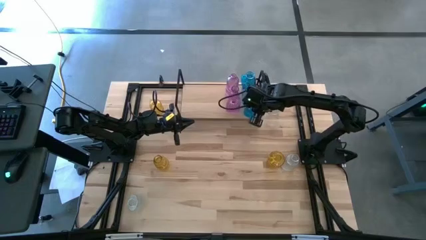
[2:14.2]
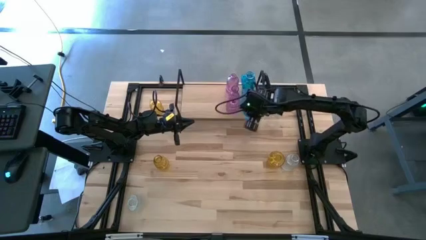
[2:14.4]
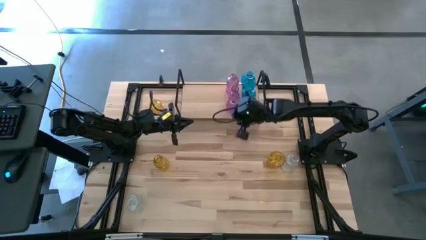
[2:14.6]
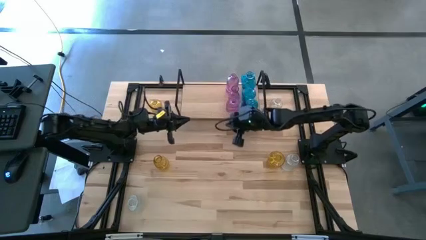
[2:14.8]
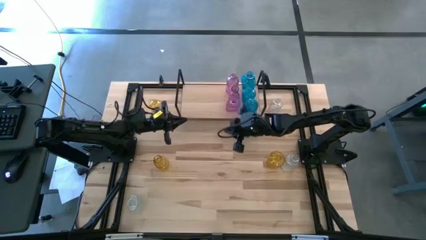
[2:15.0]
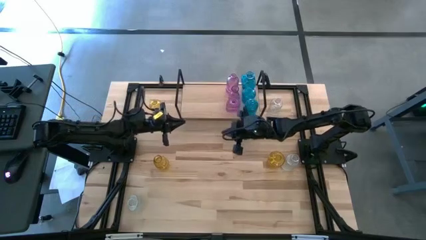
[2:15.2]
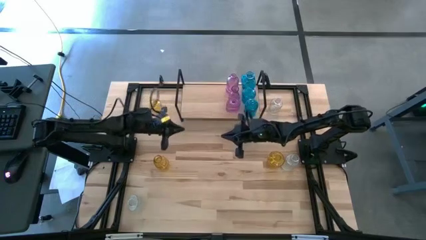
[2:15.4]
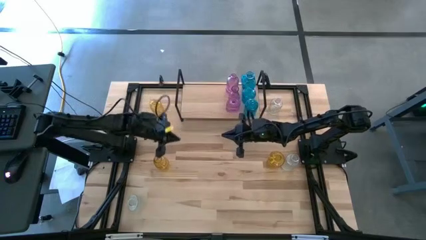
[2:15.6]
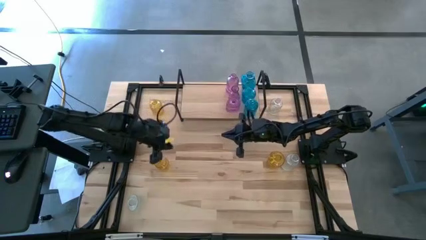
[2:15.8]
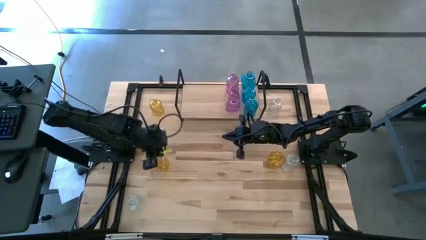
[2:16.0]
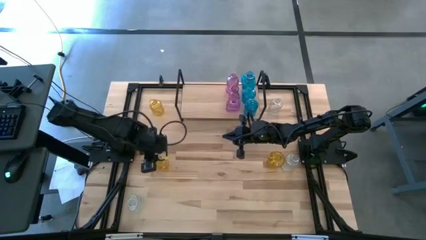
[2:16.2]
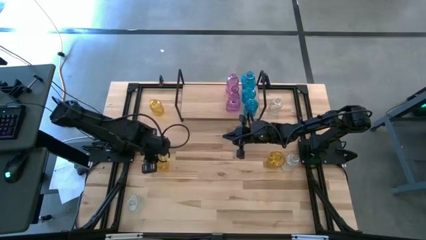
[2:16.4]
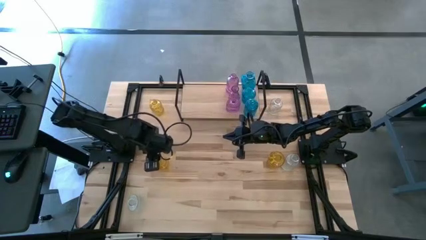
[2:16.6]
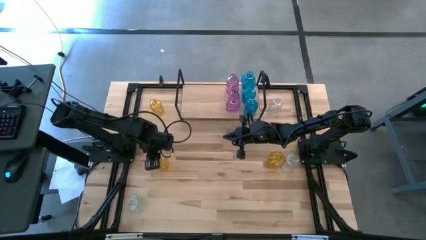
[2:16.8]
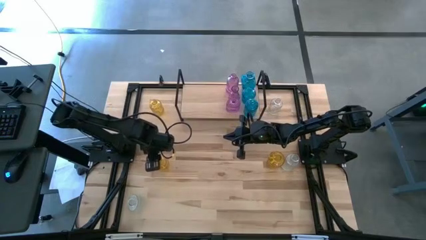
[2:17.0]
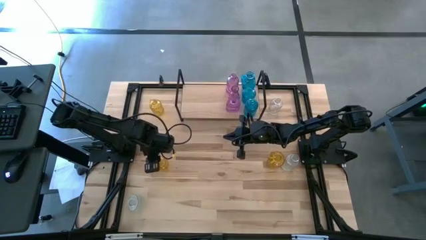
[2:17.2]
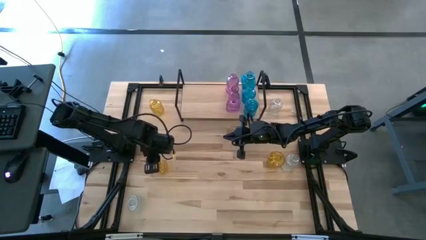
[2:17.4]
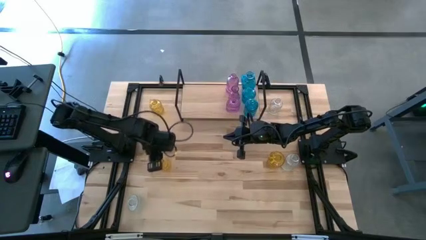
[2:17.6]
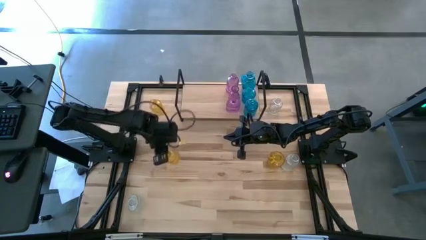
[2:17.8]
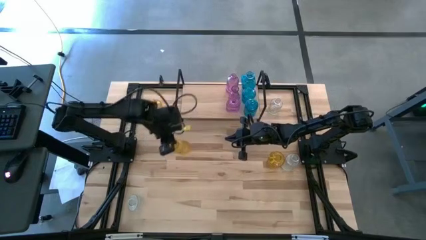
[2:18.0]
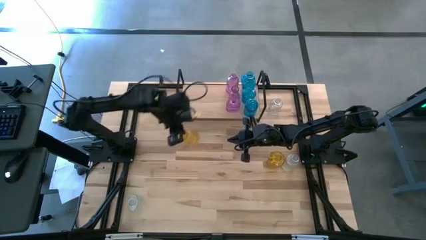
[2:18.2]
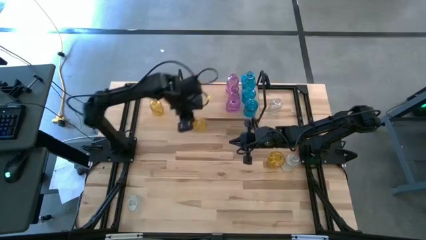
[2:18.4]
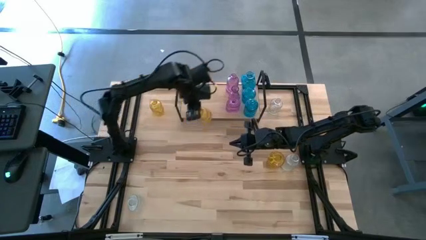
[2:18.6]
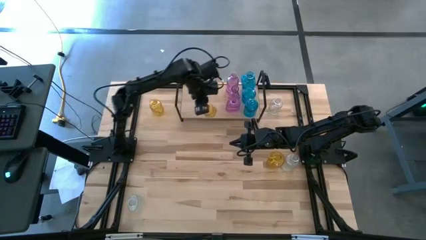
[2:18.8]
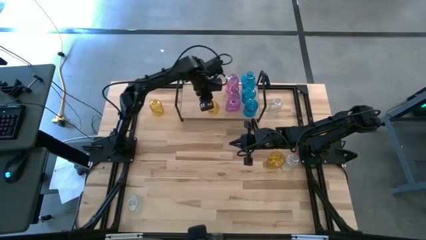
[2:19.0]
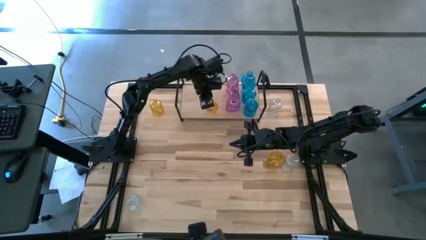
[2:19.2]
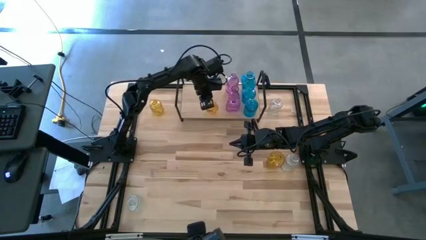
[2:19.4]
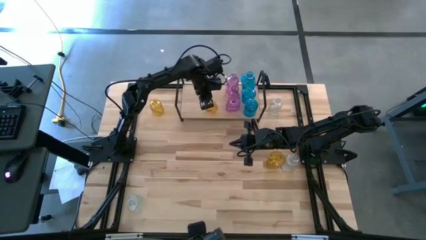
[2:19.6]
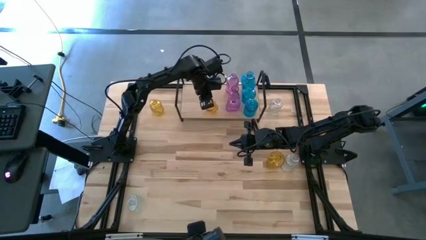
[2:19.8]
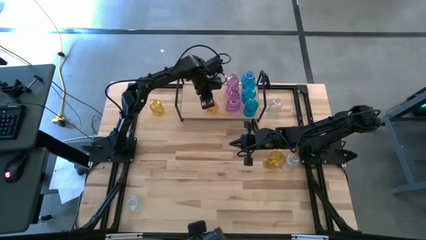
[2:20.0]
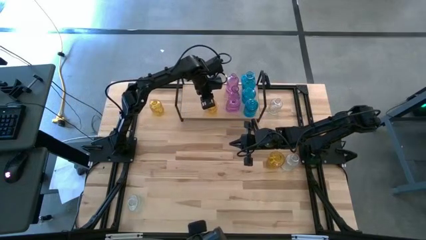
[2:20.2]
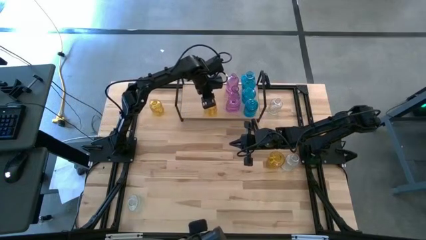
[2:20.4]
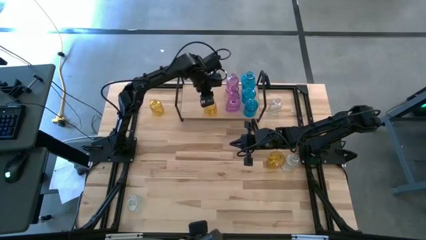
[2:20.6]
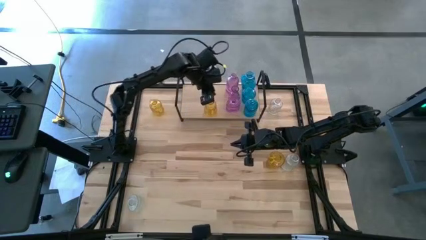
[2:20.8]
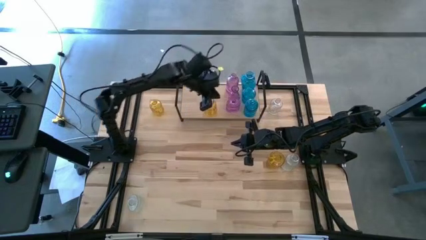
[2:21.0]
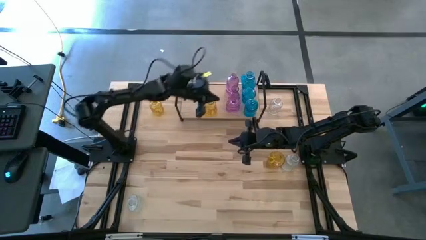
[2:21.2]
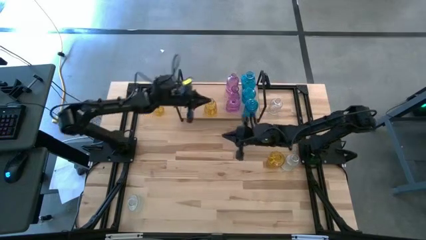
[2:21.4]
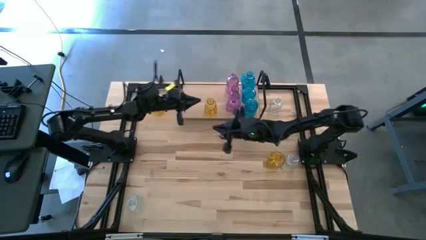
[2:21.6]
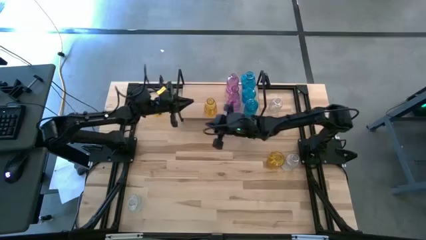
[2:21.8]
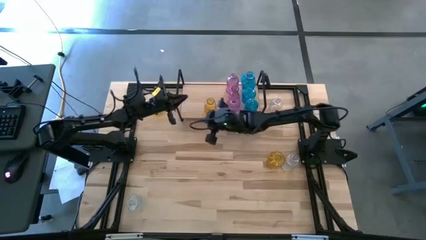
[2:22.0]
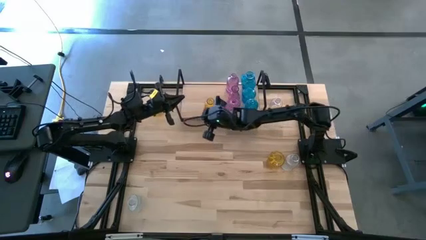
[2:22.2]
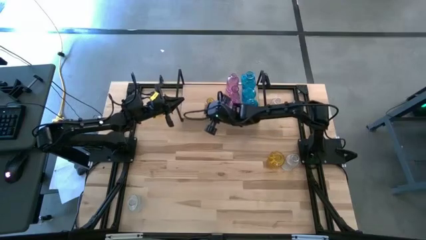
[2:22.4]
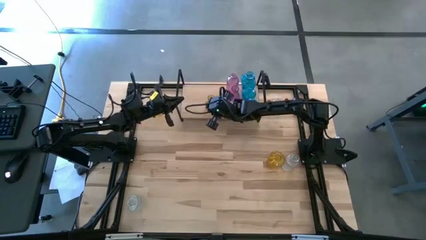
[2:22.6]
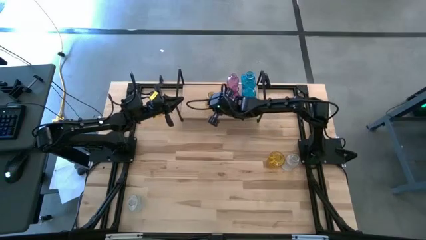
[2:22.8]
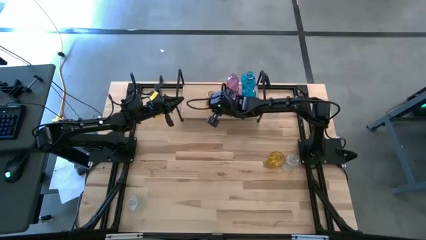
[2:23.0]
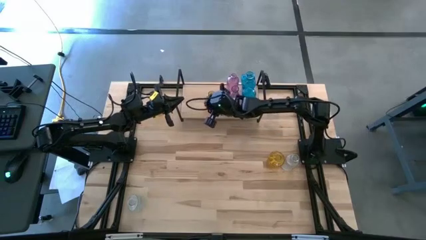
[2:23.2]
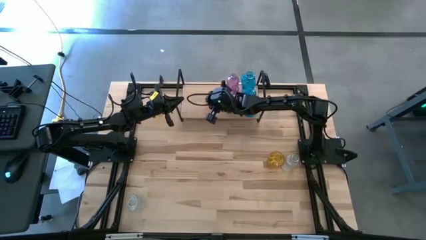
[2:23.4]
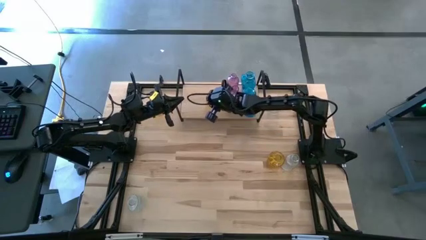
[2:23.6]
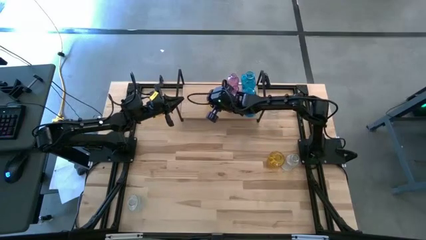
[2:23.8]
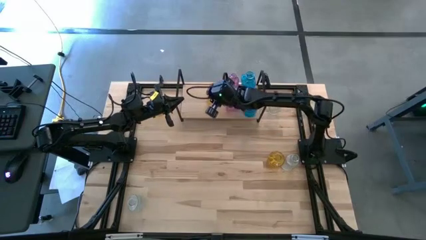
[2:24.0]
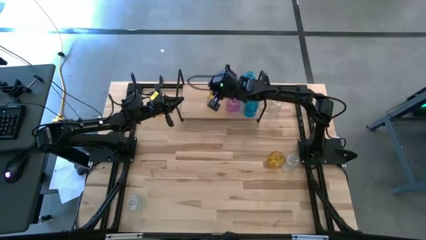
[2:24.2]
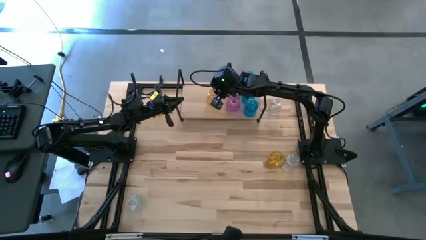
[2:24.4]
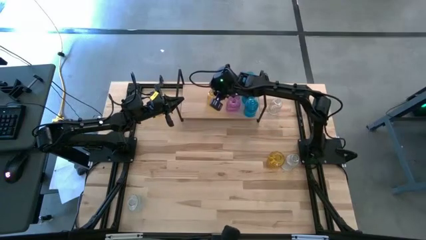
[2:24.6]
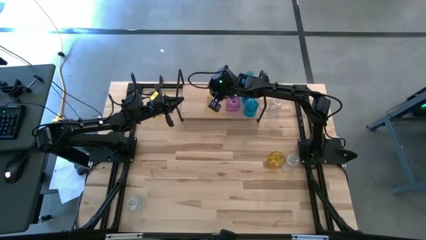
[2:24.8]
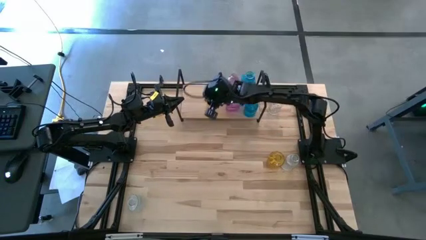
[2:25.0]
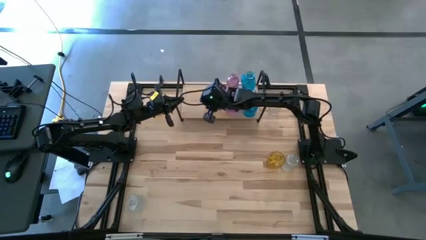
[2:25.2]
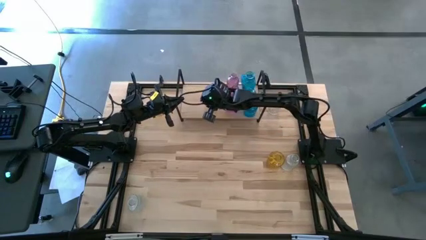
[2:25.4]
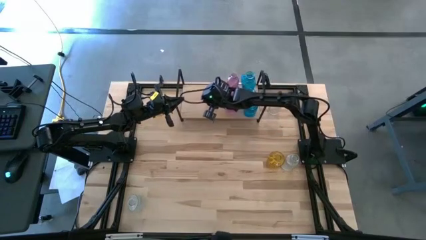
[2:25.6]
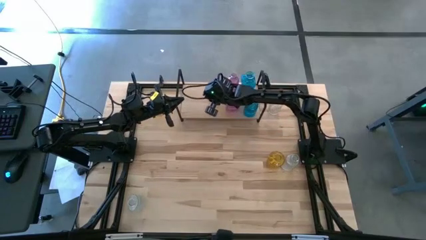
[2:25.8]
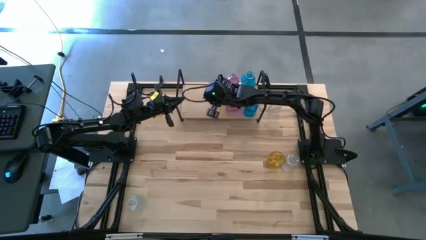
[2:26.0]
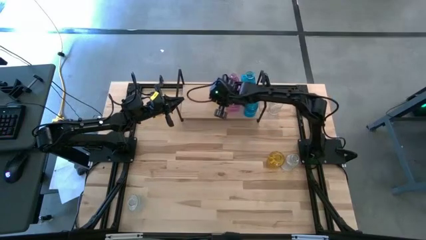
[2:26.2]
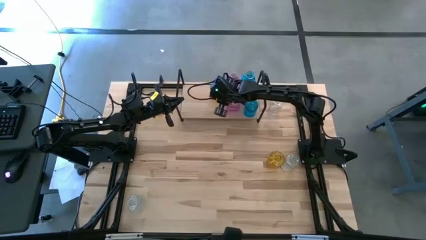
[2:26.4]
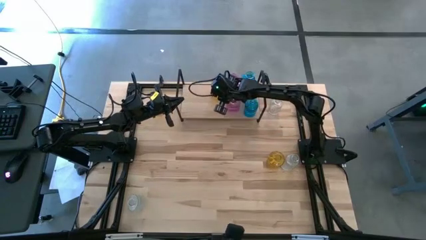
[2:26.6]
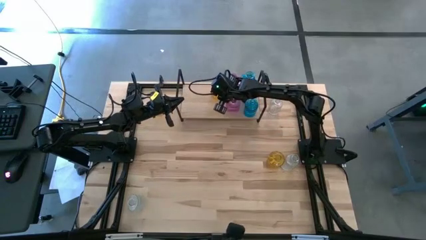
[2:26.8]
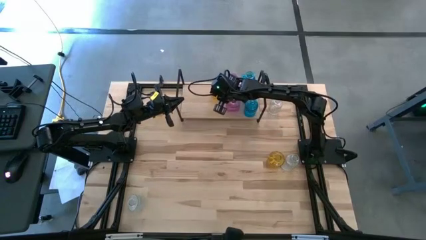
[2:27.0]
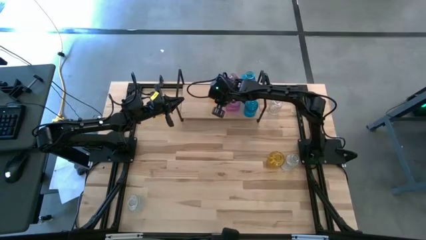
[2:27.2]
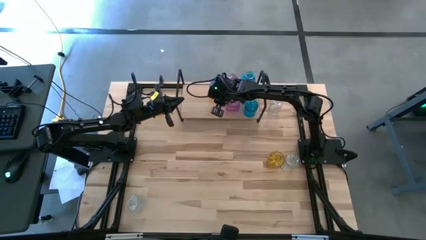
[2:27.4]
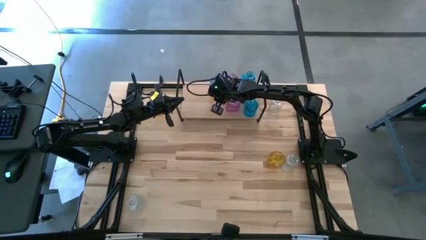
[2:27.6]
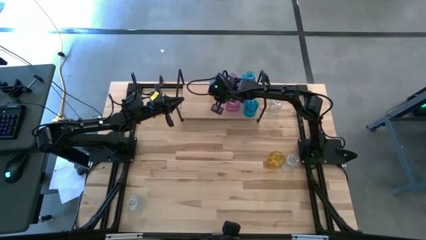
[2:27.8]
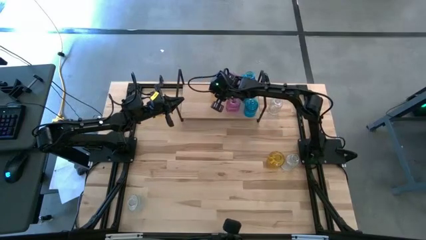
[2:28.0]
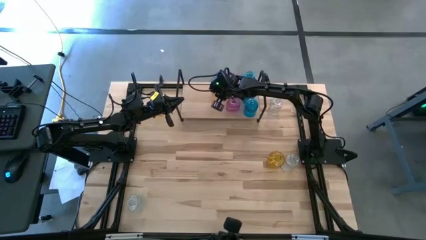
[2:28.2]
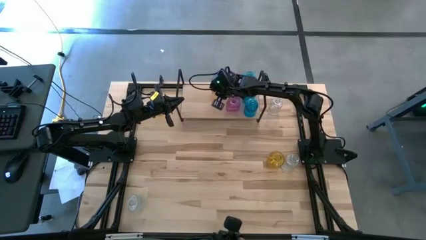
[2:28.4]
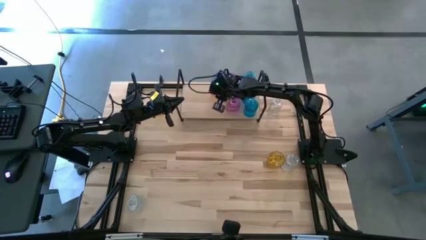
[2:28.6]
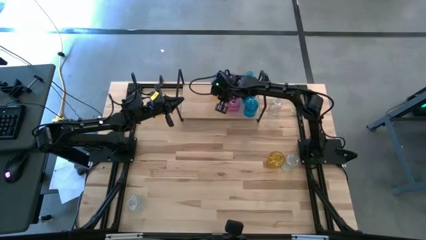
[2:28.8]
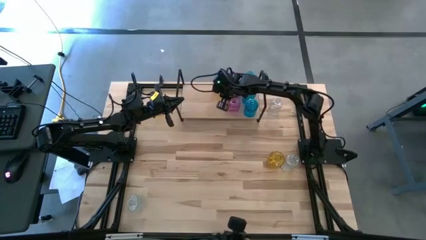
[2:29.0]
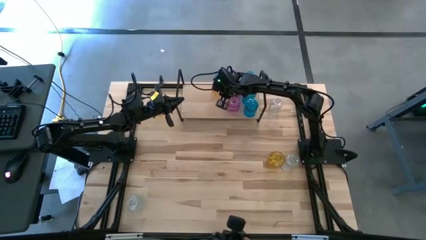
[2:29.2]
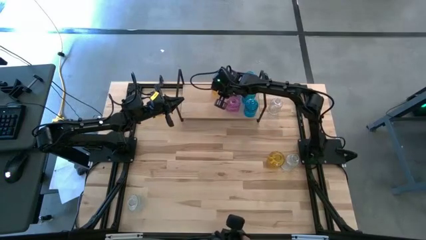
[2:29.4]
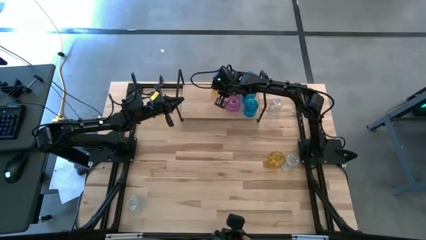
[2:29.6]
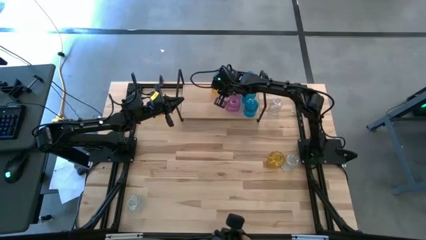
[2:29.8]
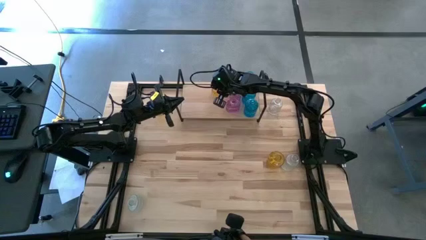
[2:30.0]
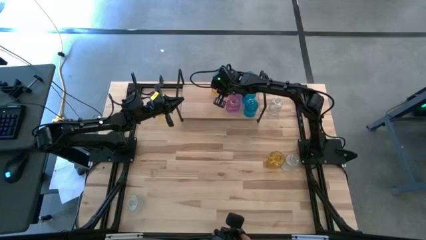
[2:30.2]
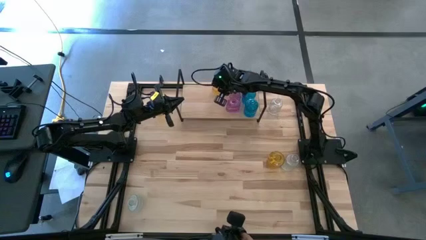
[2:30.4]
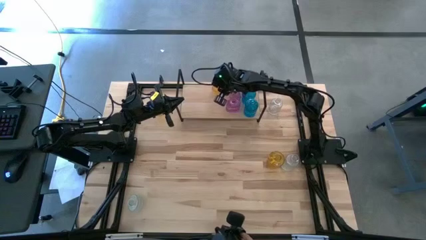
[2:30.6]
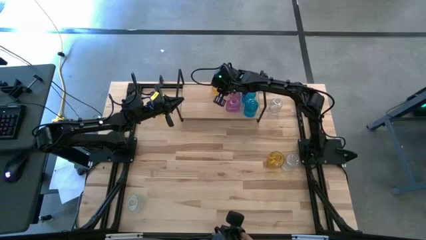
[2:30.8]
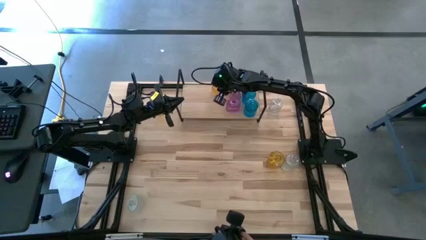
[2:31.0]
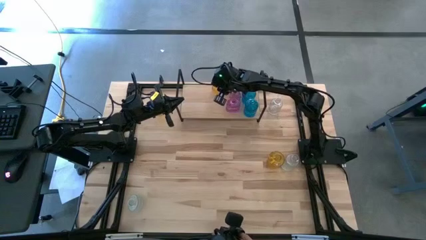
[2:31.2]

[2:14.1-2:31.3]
Task: sort vases onto shelf
Put the bottom left yellow vase on the shelf
